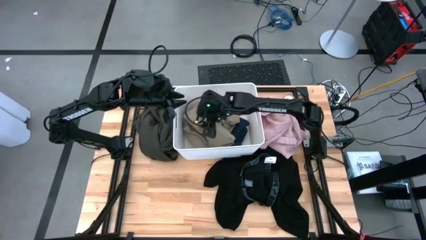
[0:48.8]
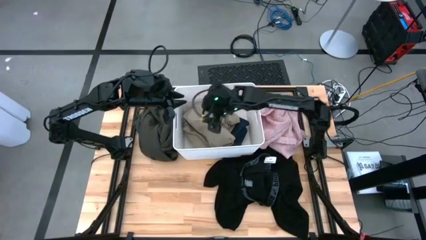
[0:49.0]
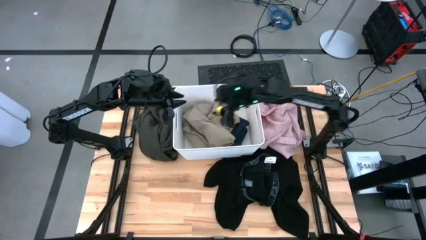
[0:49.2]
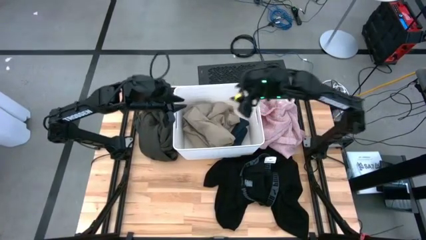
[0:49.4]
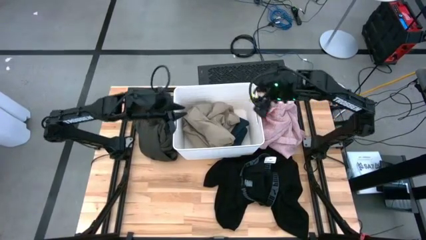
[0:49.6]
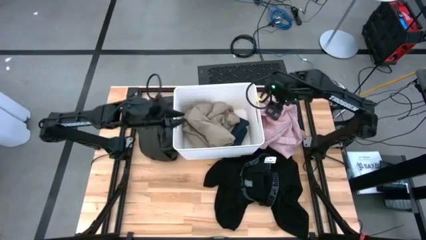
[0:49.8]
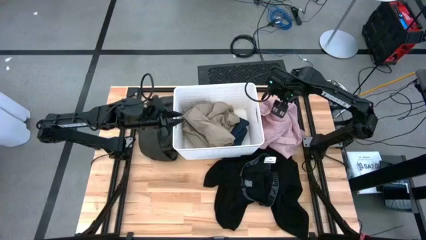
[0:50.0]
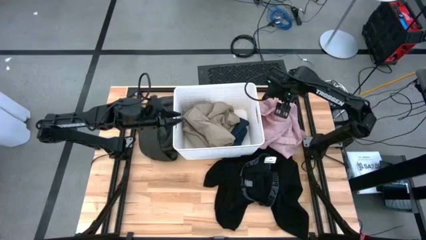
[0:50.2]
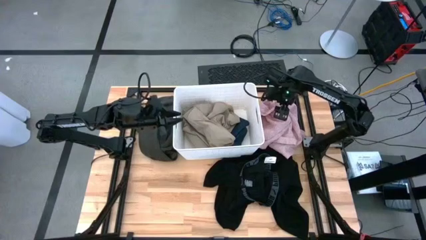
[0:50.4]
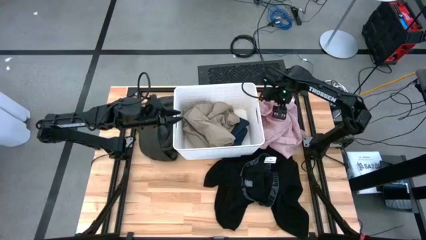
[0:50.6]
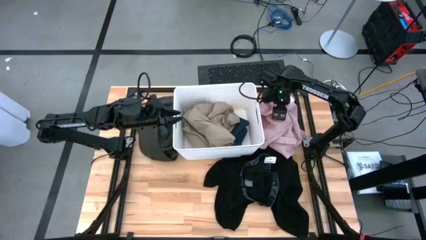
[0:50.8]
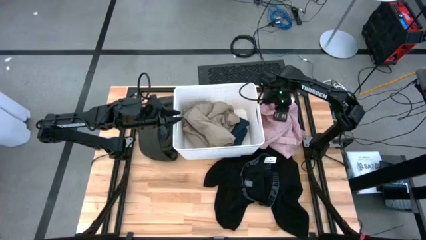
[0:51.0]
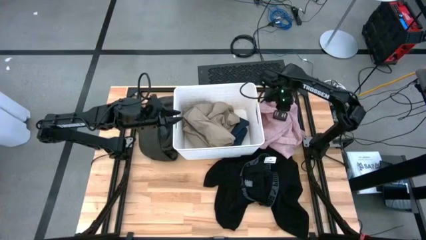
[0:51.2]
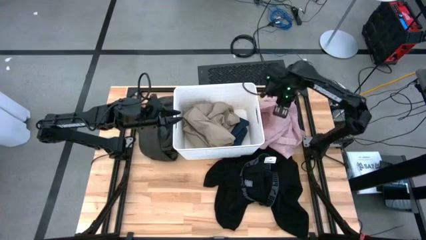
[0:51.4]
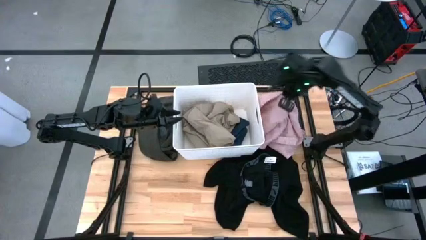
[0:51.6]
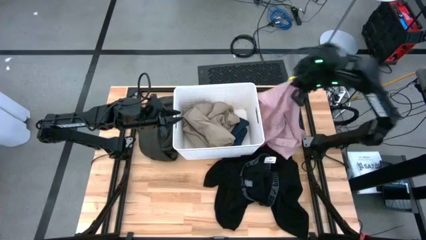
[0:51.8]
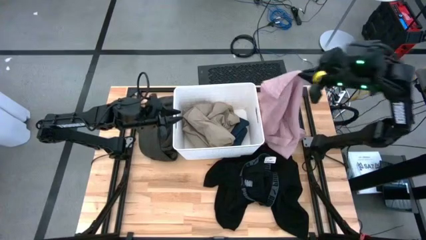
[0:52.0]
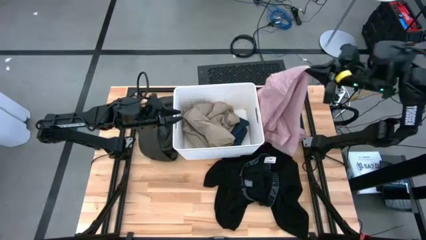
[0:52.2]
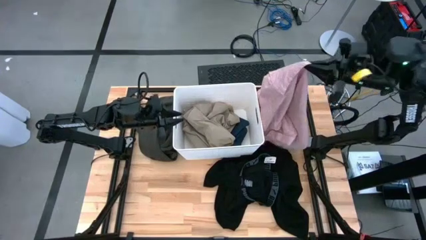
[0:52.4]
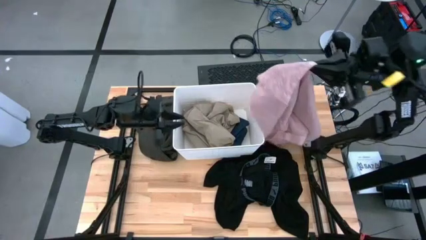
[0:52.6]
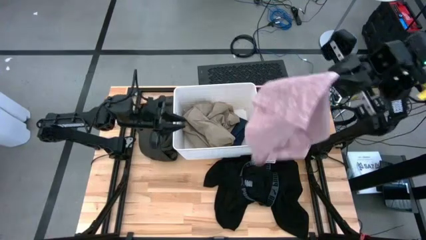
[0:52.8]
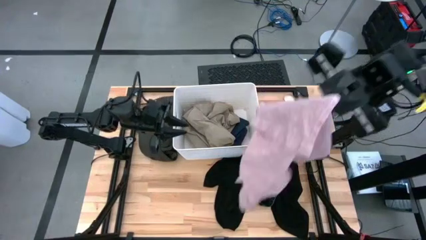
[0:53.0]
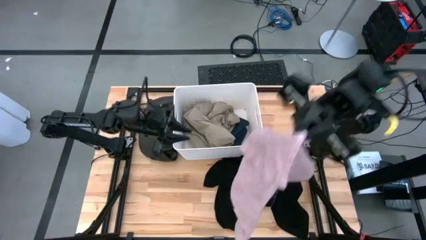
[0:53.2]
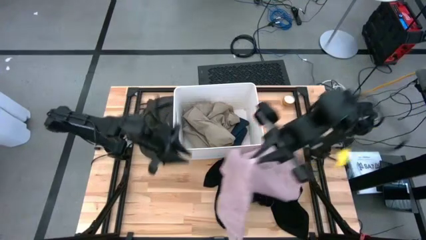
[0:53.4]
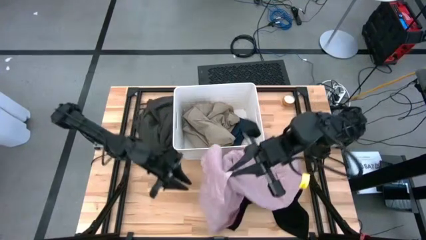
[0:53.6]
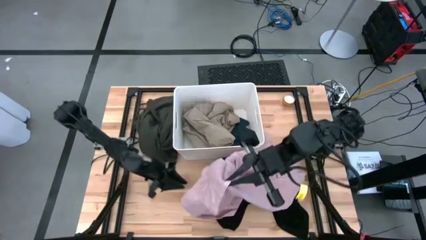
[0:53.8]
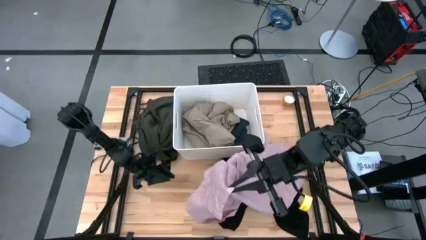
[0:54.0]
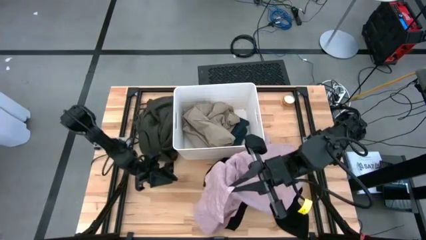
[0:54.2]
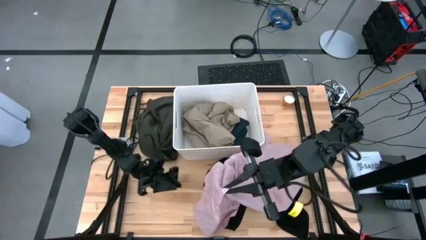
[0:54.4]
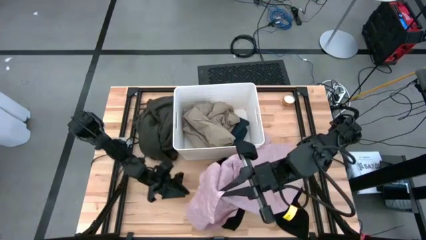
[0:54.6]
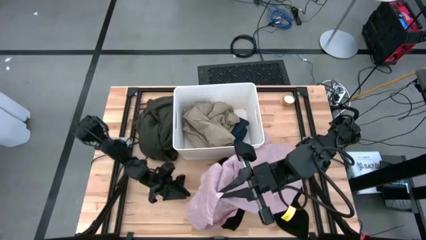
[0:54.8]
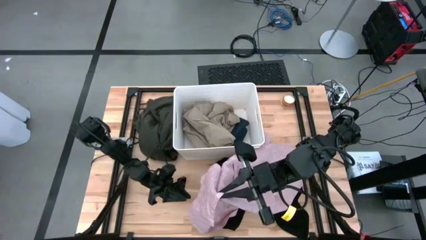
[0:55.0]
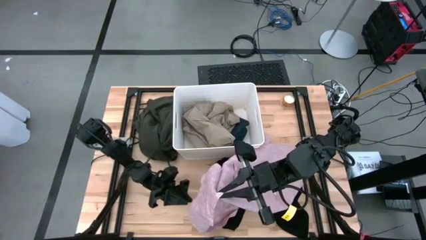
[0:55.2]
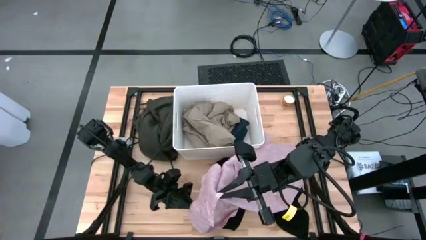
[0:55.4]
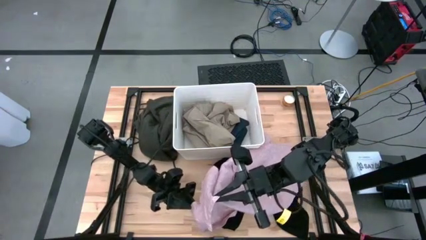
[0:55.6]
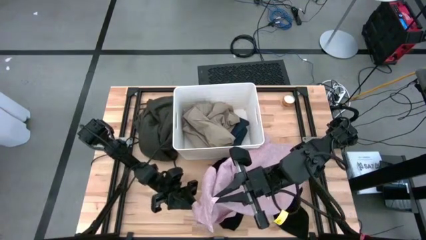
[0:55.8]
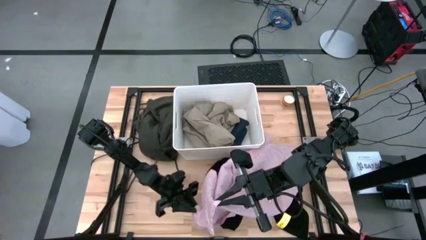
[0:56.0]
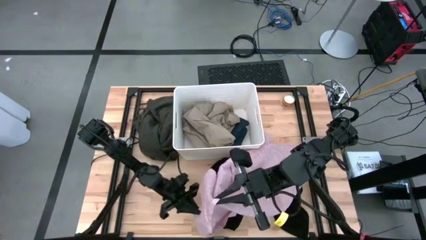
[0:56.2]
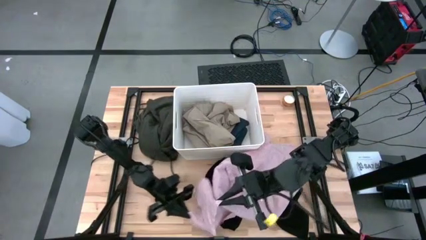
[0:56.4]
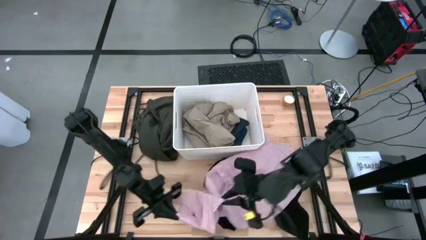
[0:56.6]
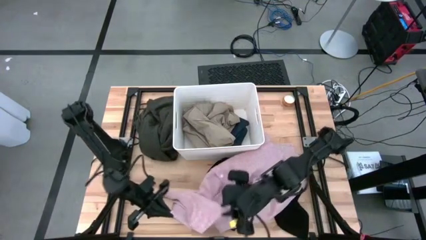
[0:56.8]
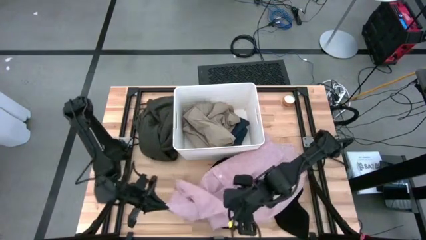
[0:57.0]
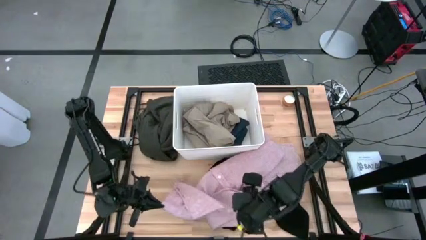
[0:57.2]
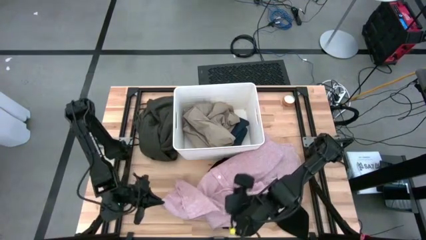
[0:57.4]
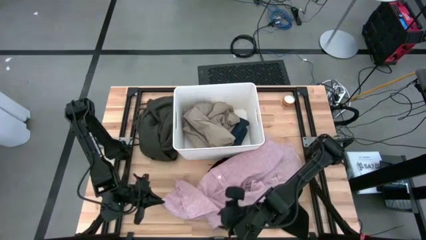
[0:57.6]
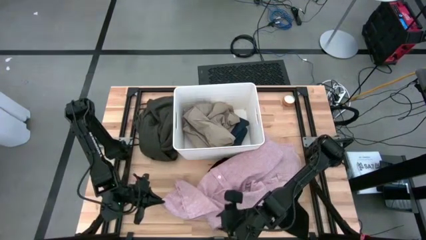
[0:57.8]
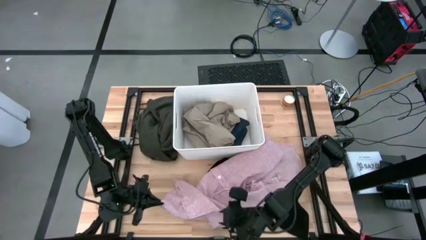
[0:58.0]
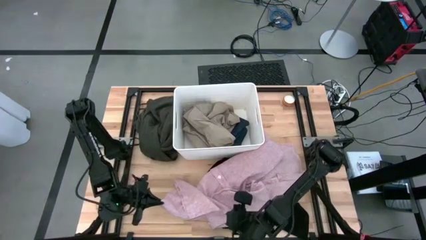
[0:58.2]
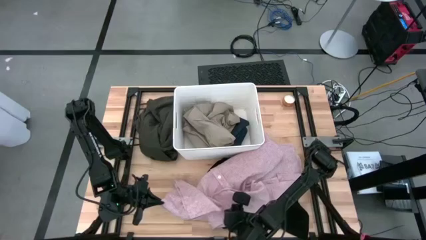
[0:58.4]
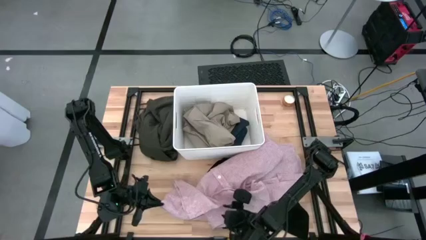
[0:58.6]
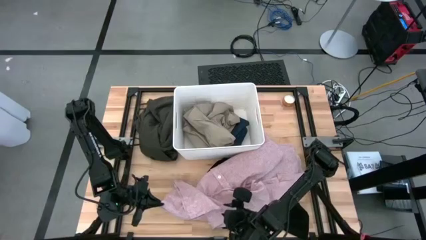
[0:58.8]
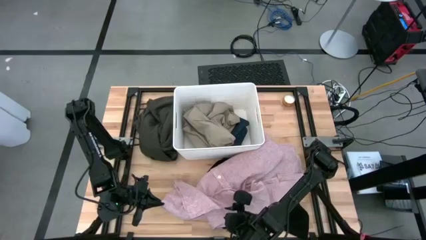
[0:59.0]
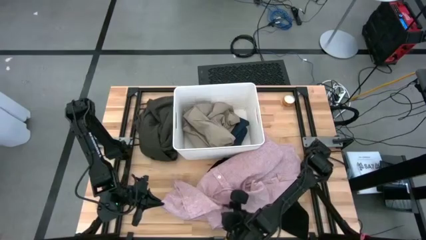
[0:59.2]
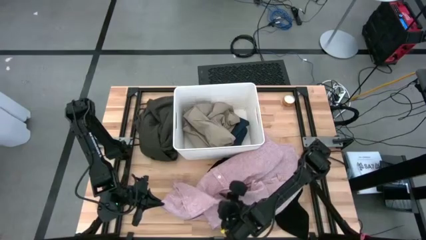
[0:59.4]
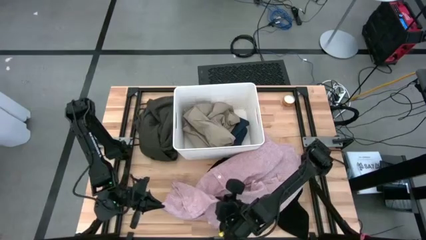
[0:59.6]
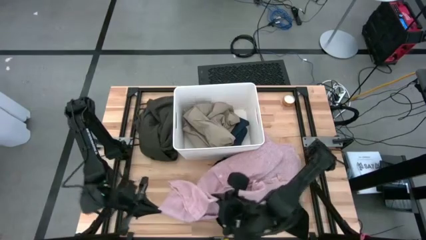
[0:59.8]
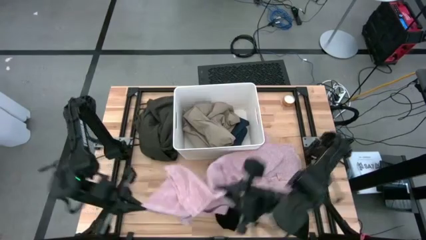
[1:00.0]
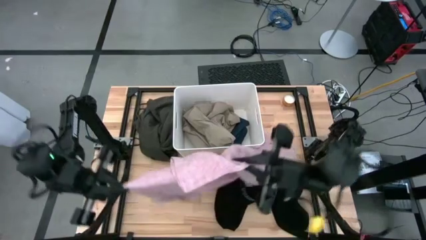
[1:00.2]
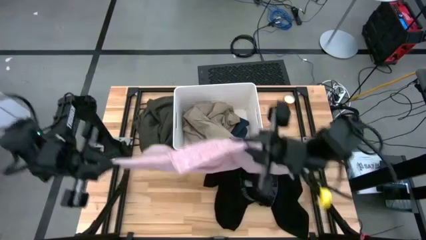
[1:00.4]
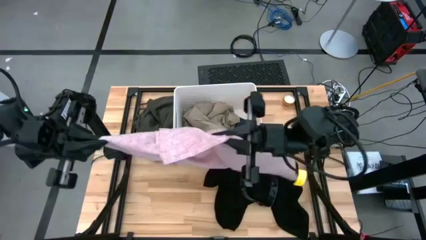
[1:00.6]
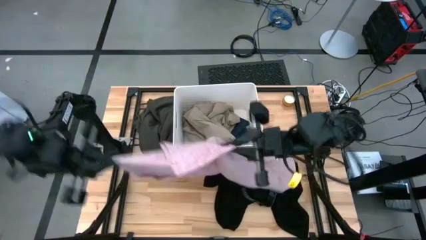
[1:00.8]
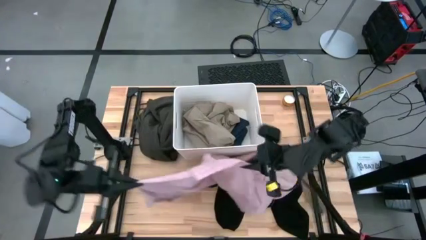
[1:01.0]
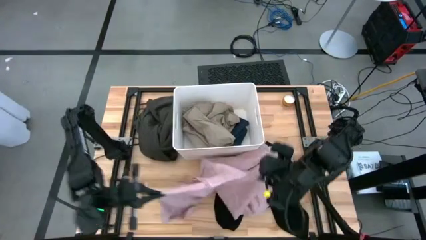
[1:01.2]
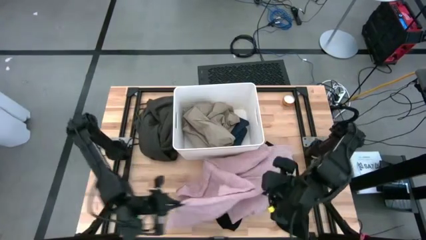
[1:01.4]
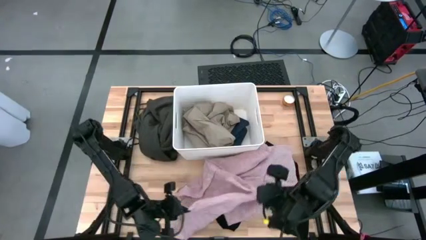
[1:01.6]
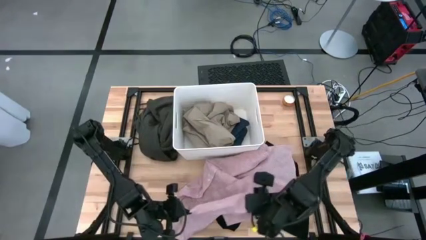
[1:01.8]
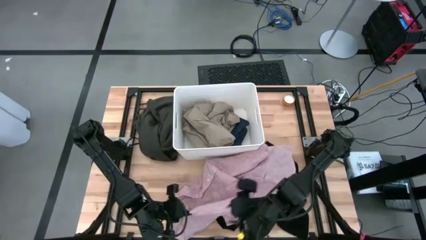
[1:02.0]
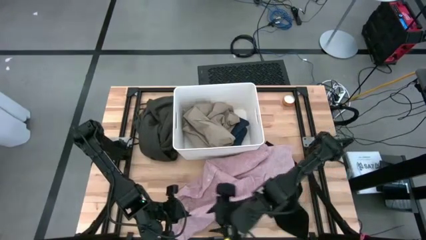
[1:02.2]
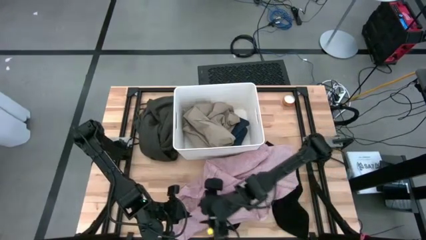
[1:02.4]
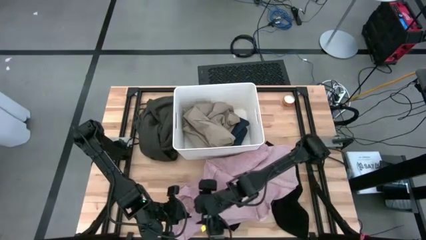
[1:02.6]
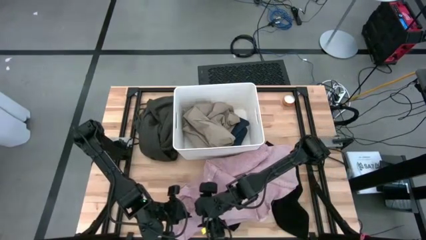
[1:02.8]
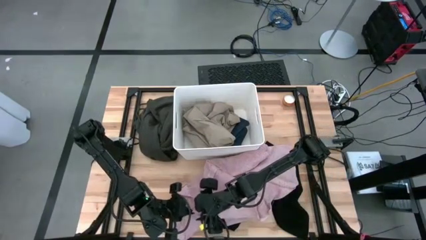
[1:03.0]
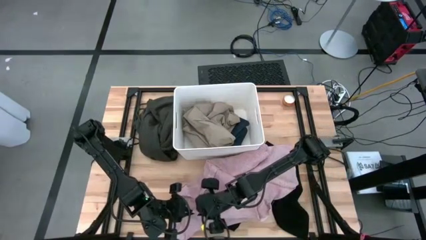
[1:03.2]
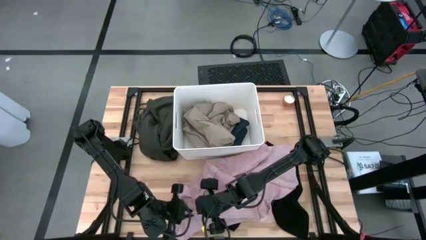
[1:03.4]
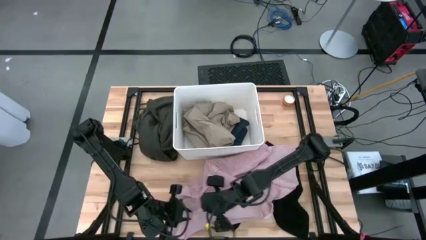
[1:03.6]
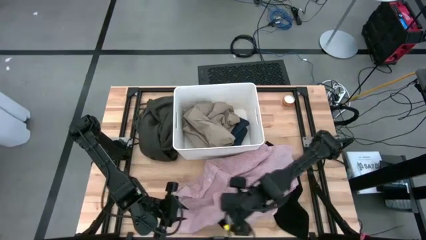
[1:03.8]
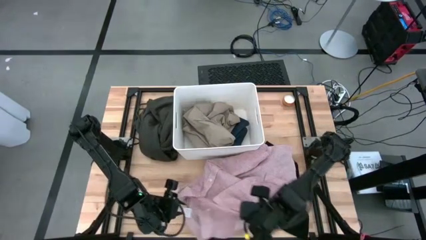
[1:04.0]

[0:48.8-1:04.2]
Task: Sort clothes
Fold the pink shirt

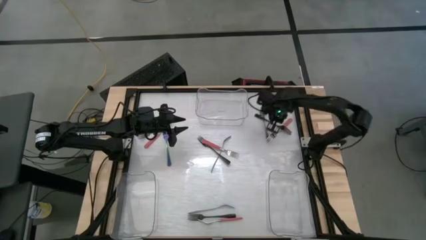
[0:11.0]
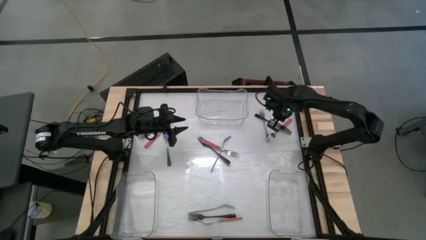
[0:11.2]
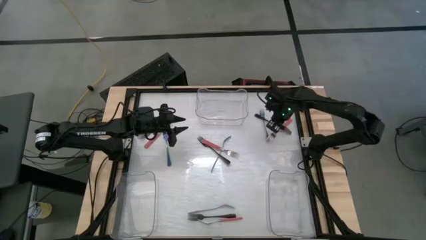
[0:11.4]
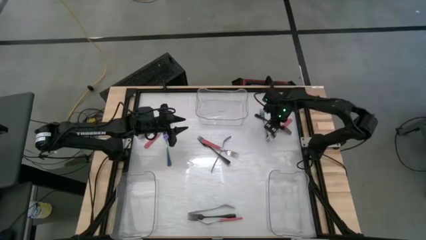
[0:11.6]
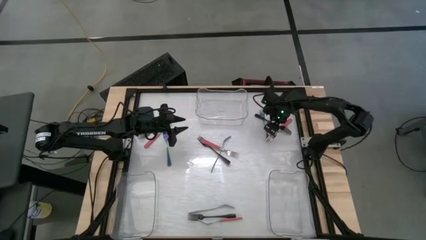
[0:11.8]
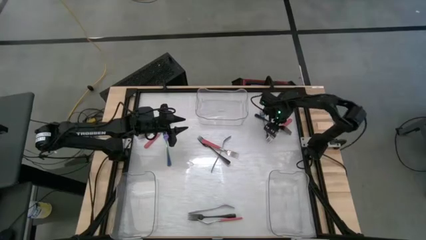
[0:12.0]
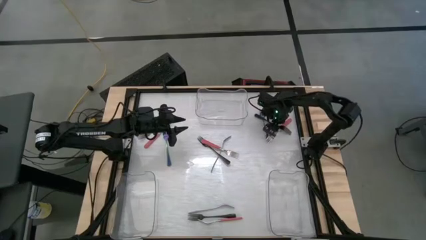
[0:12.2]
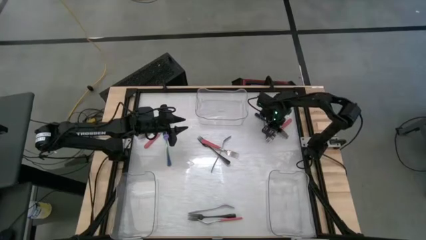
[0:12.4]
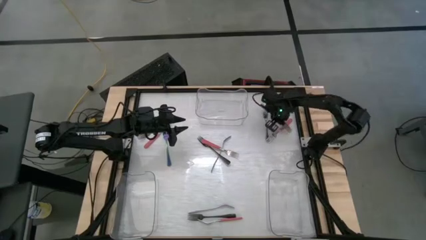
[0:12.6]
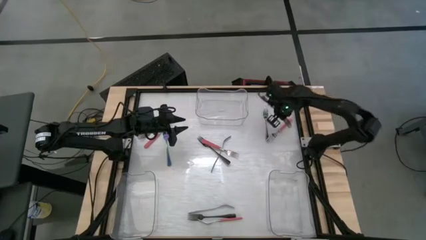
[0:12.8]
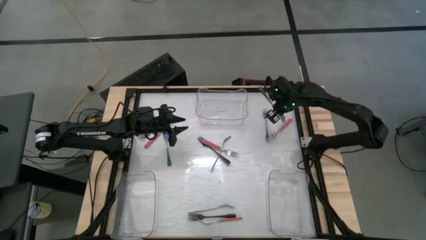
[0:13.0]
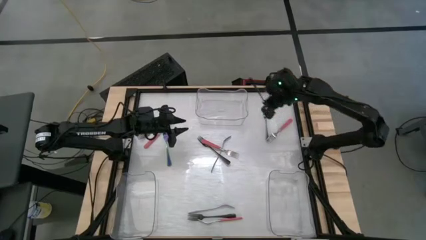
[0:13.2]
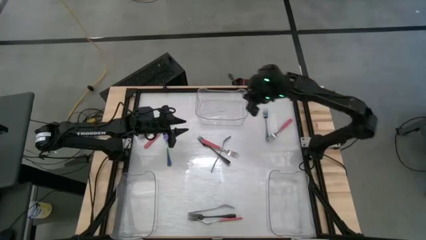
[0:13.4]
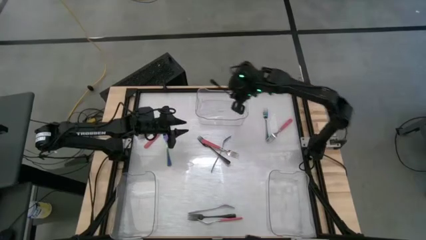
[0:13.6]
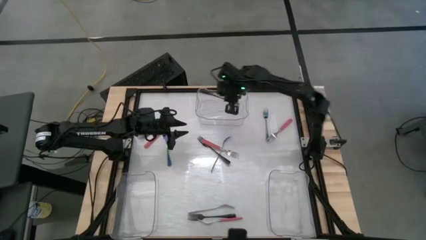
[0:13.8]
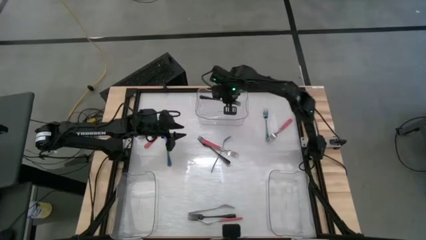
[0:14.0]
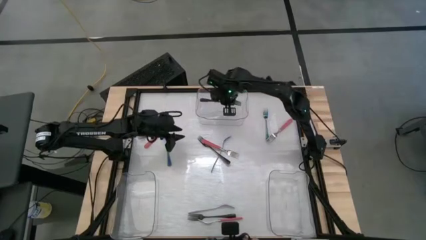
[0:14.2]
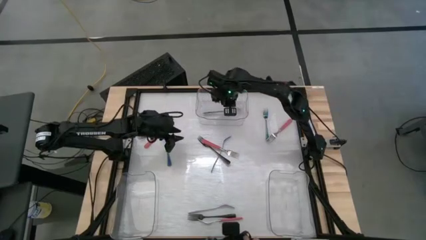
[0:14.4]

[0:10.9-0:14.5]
Task: Sort silverware by color (type)
Put the black fork into the top transparent bin
